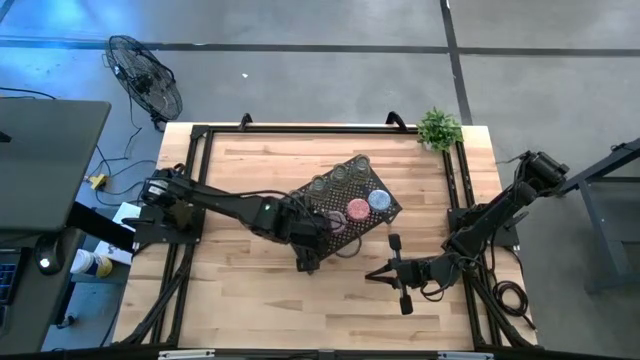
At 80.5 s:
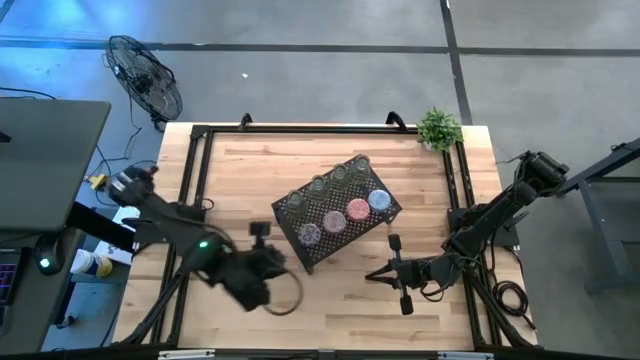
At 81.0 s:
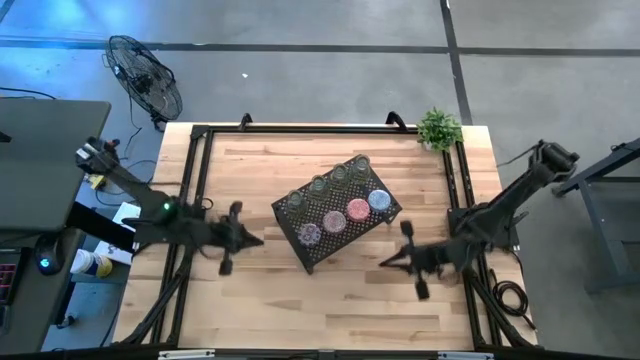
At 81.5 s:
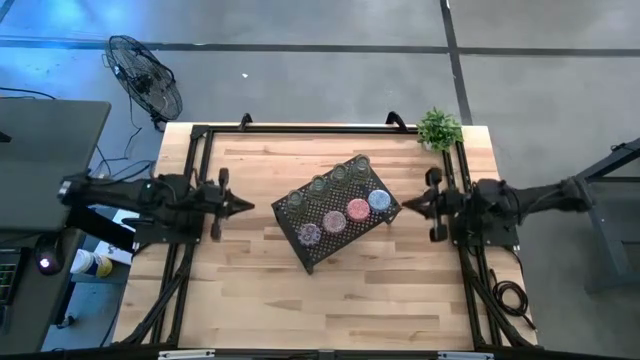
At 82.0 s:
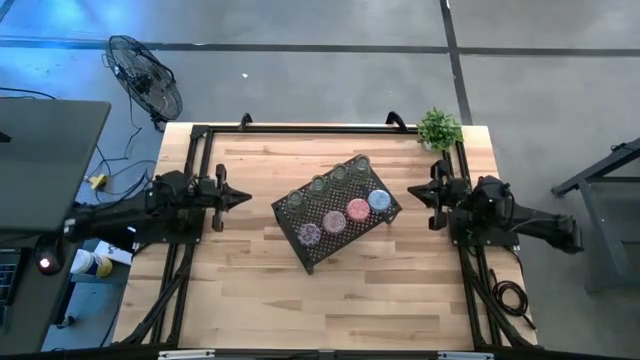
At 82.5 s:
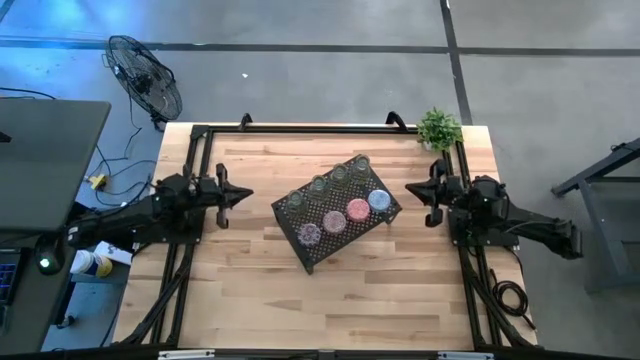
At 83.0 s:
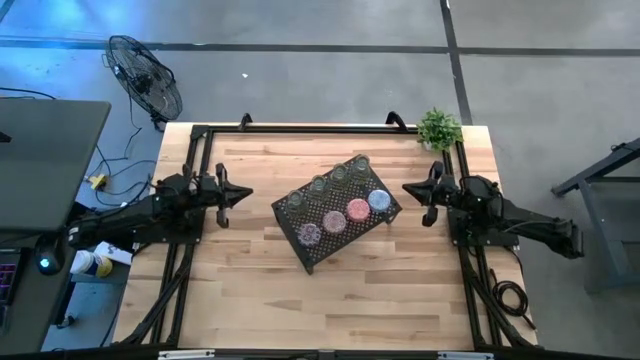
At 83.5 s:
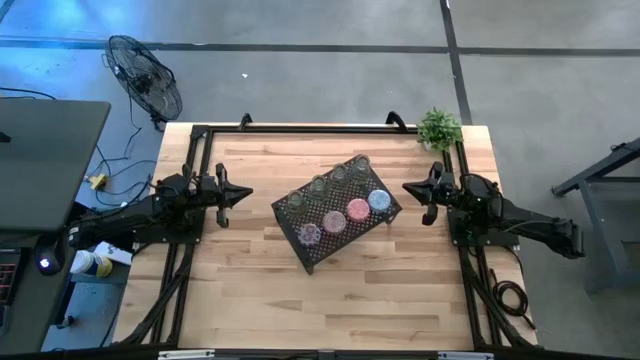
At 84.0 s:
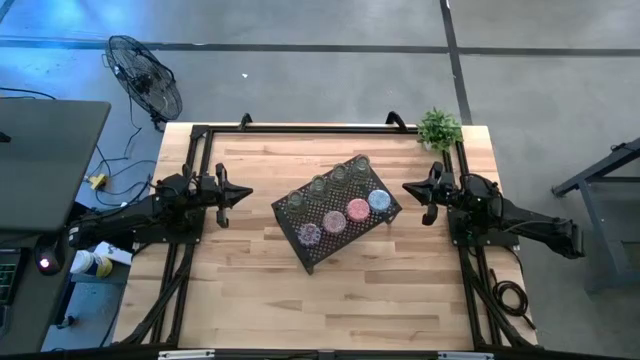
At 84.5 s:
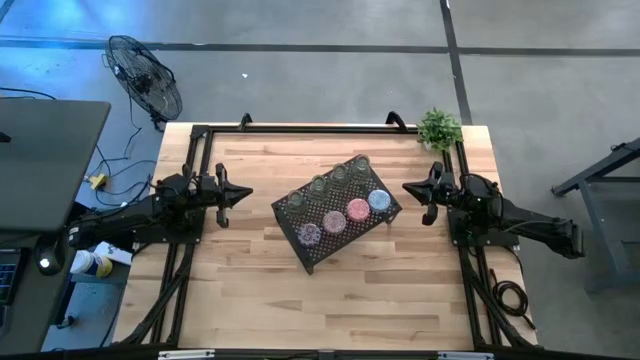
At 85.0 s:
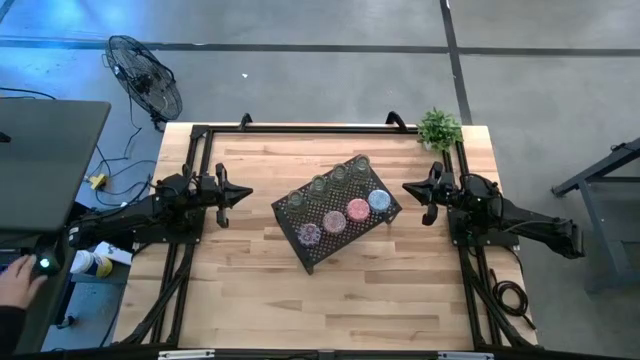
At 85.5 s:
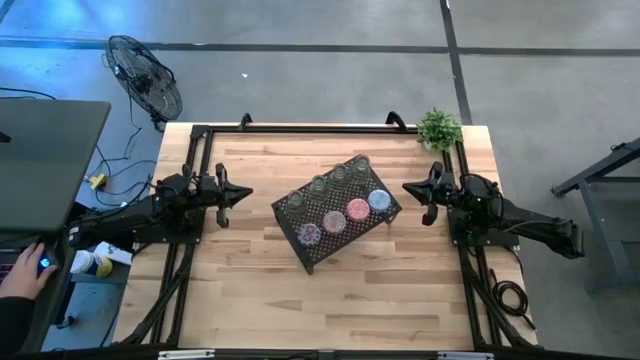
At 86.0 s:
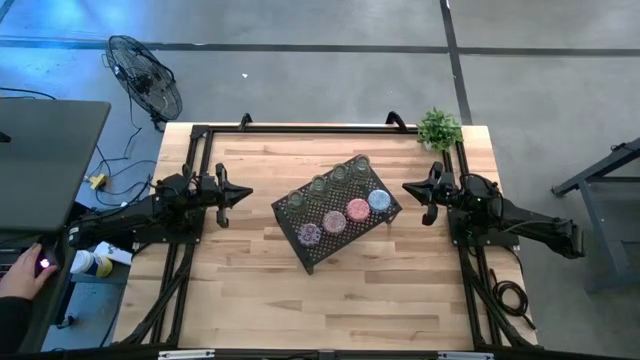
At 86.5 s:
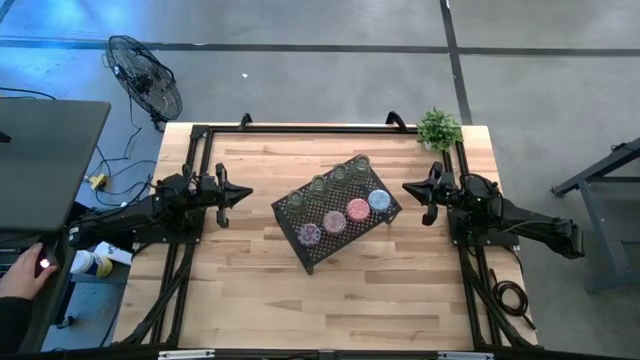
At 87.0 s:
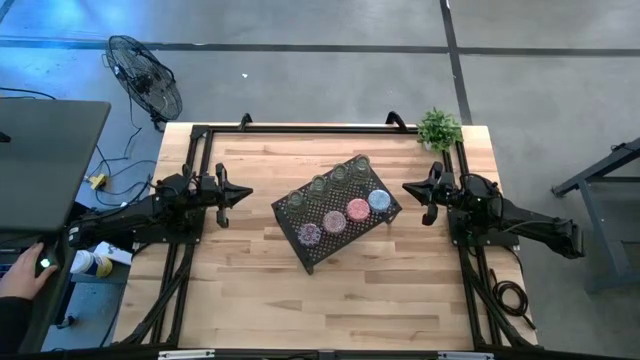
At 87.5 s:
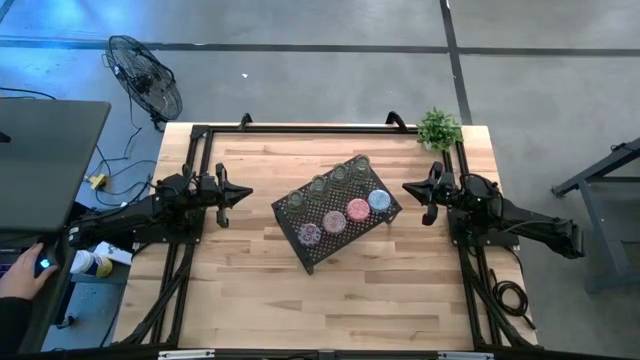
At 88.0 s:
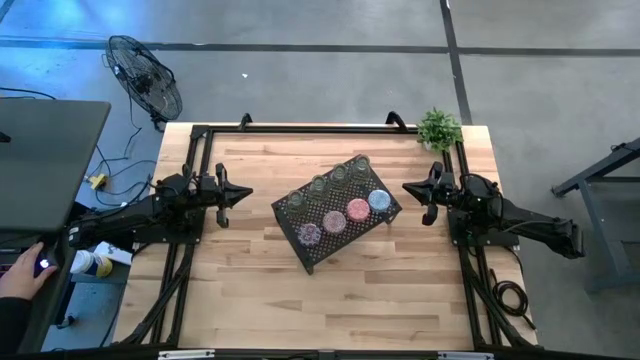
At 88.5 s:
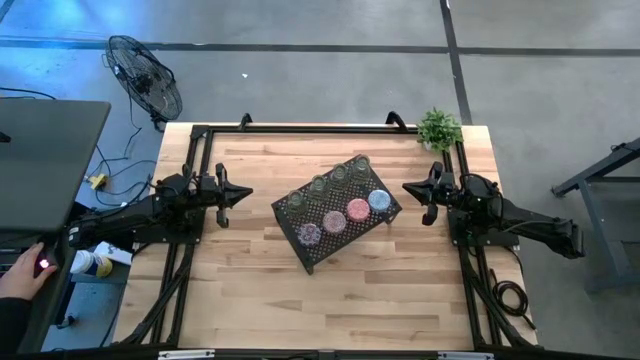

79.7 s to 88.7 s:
Task: Pick & Place candle stick holders
Return to Home Position

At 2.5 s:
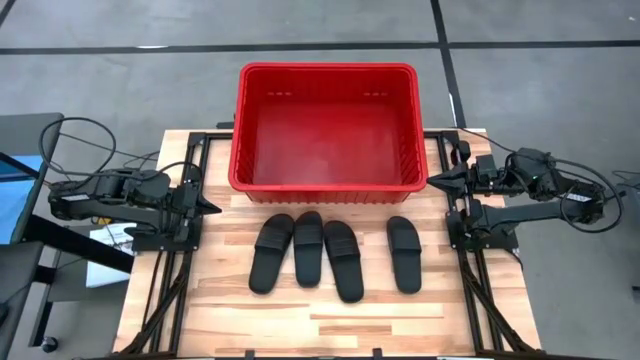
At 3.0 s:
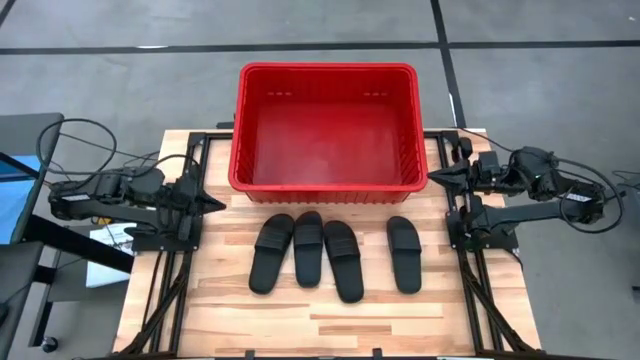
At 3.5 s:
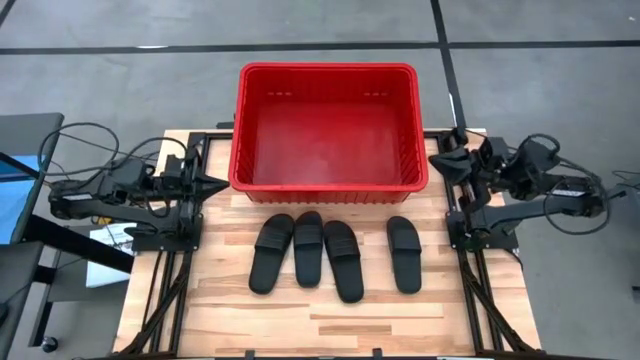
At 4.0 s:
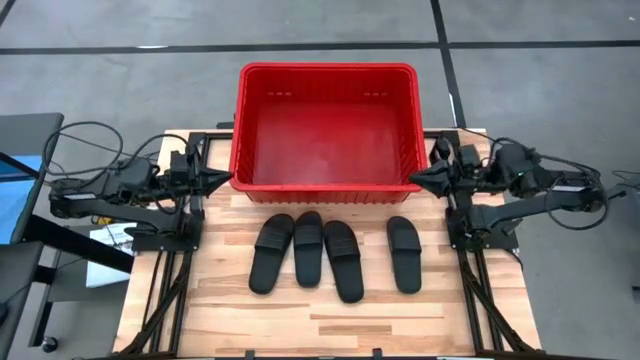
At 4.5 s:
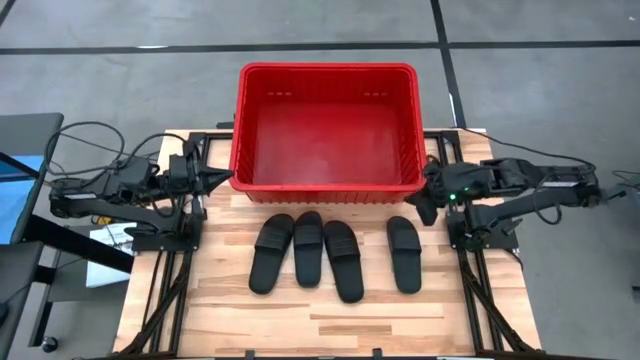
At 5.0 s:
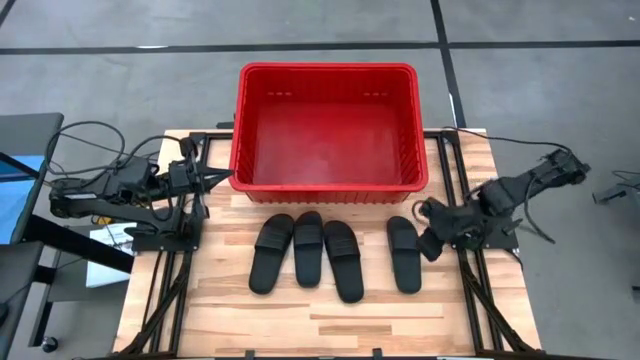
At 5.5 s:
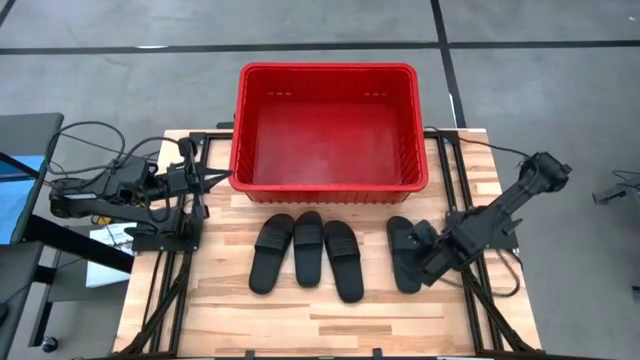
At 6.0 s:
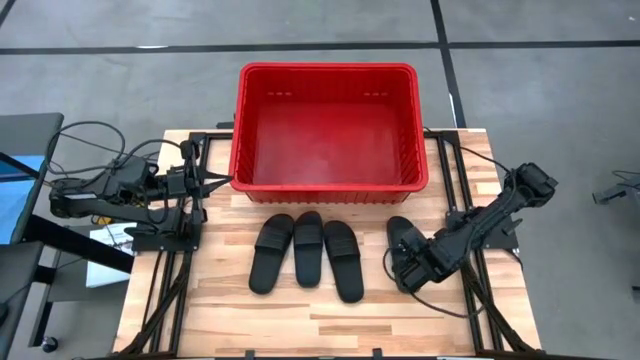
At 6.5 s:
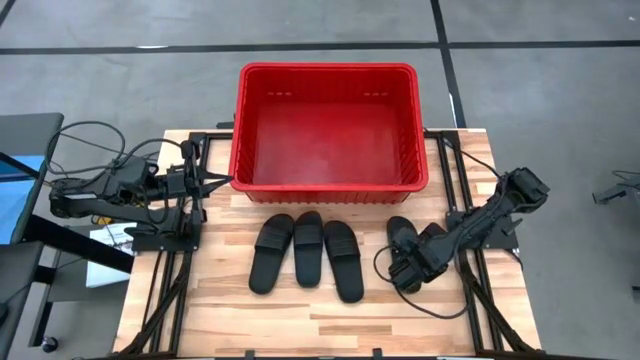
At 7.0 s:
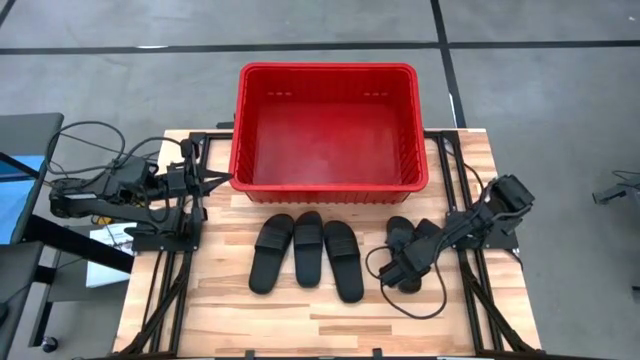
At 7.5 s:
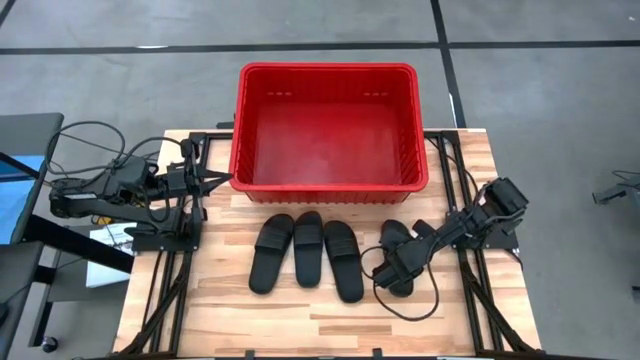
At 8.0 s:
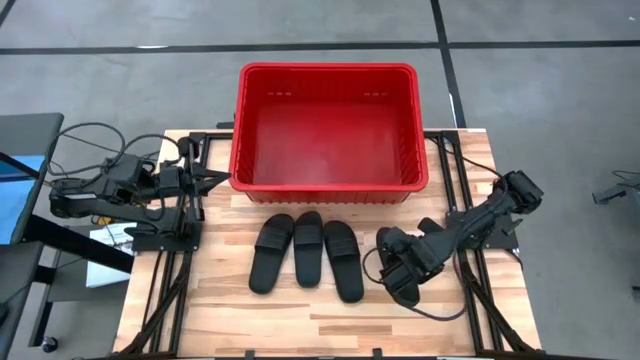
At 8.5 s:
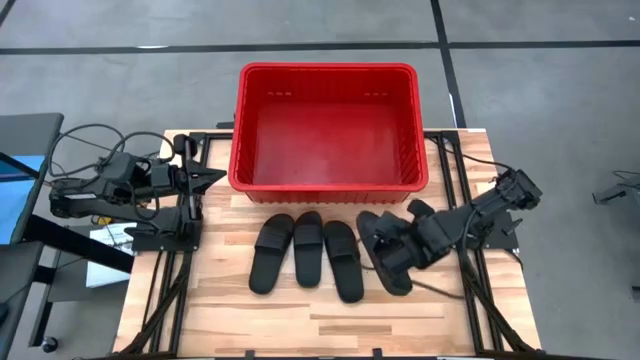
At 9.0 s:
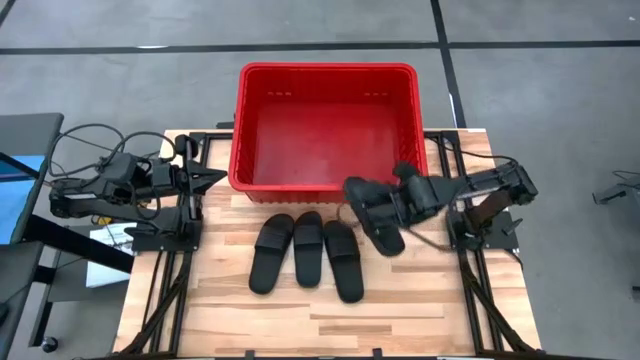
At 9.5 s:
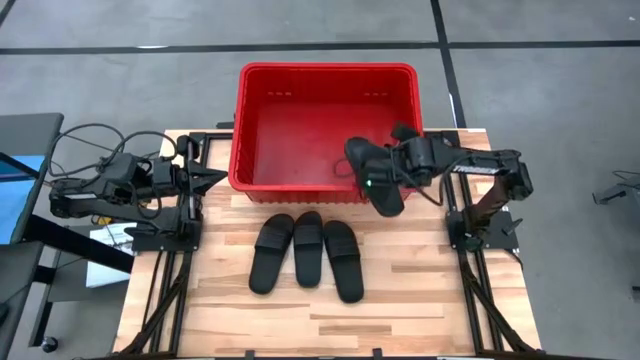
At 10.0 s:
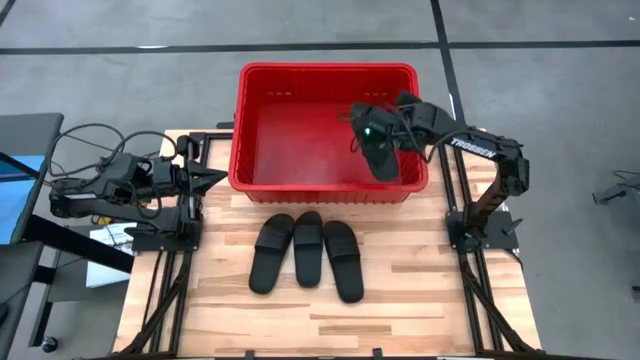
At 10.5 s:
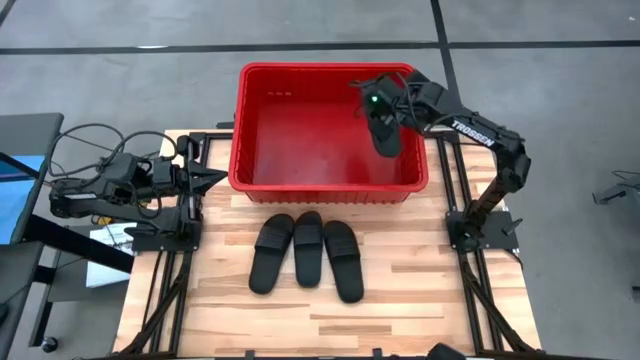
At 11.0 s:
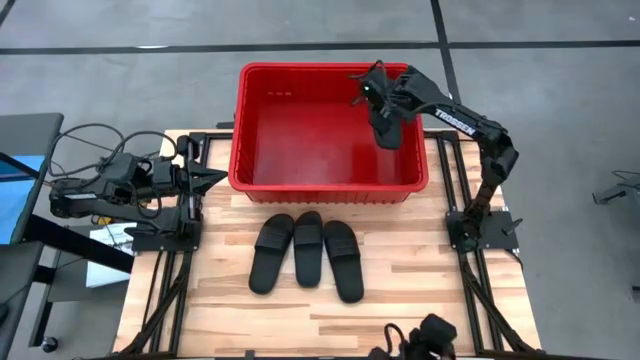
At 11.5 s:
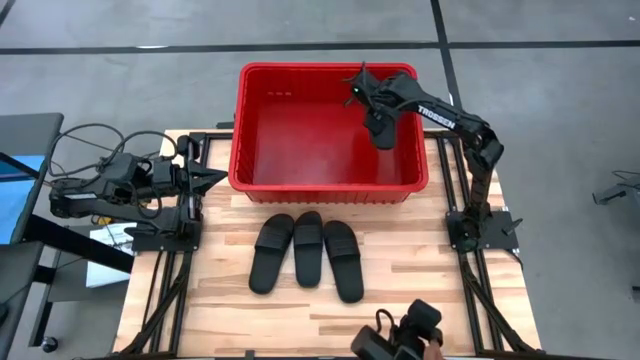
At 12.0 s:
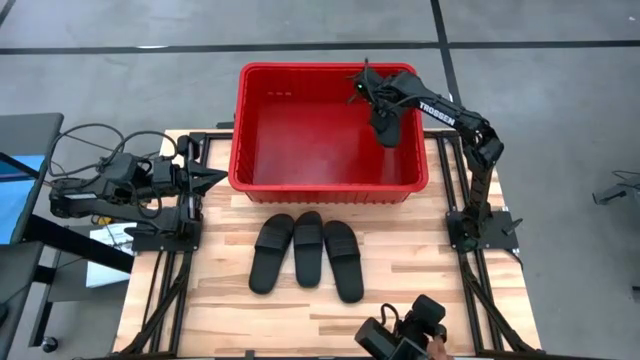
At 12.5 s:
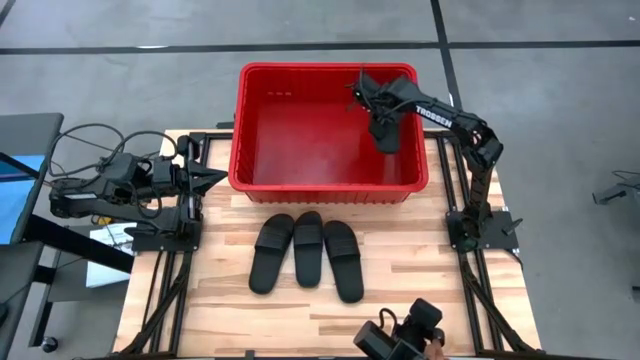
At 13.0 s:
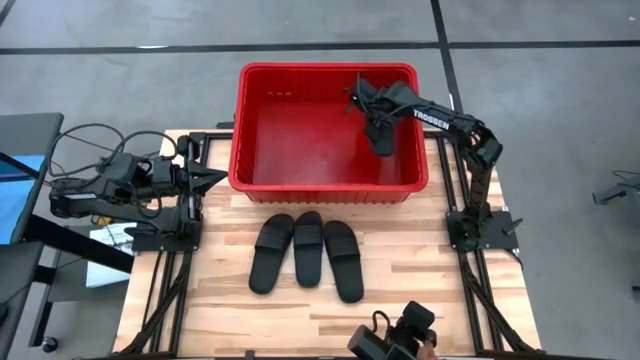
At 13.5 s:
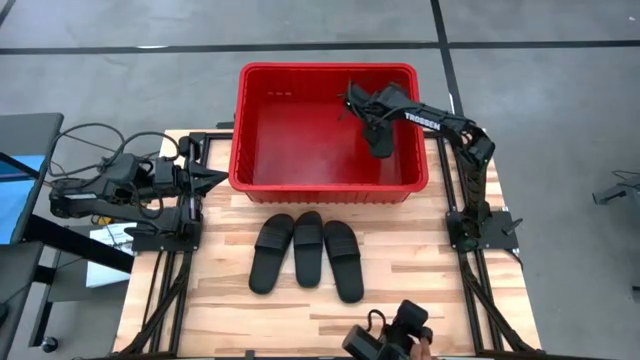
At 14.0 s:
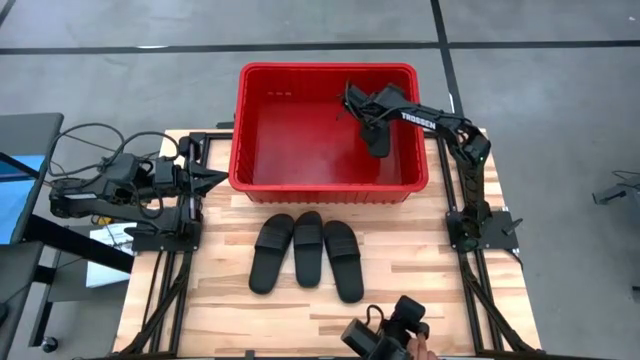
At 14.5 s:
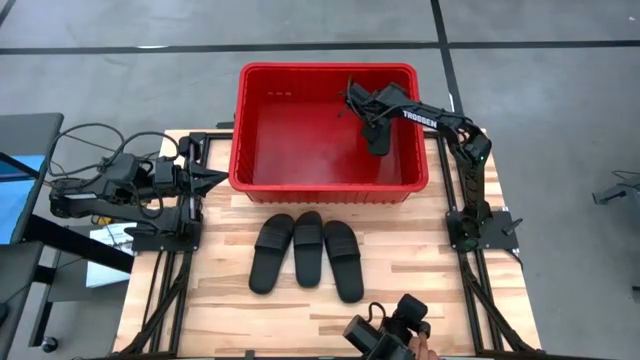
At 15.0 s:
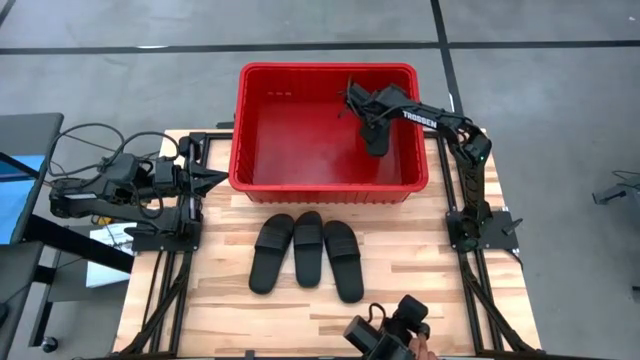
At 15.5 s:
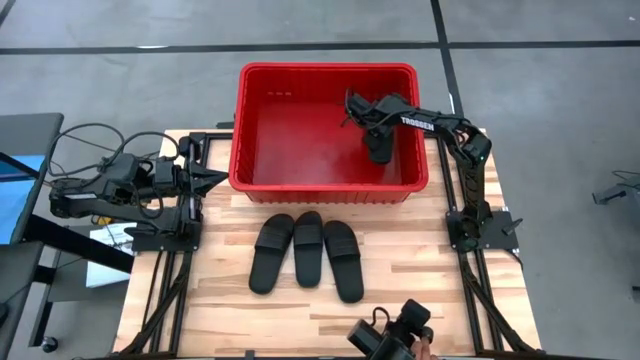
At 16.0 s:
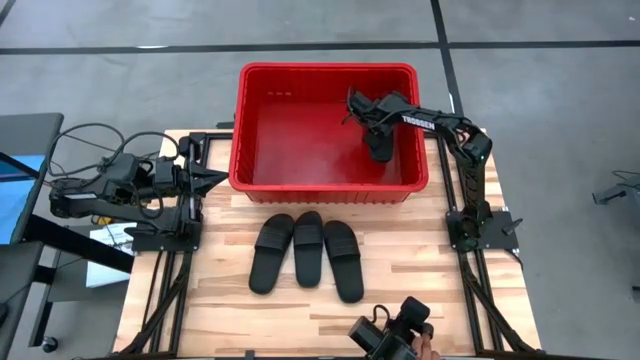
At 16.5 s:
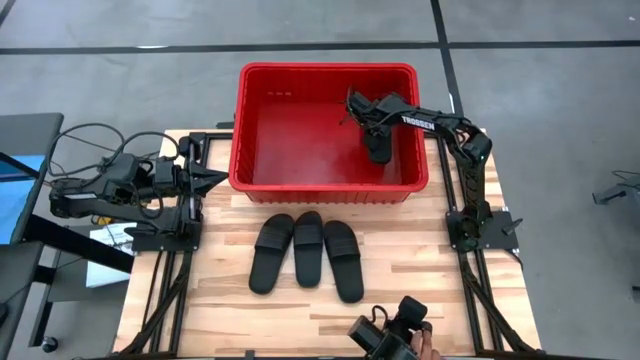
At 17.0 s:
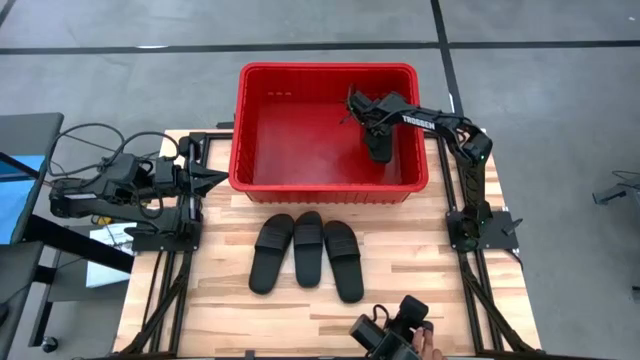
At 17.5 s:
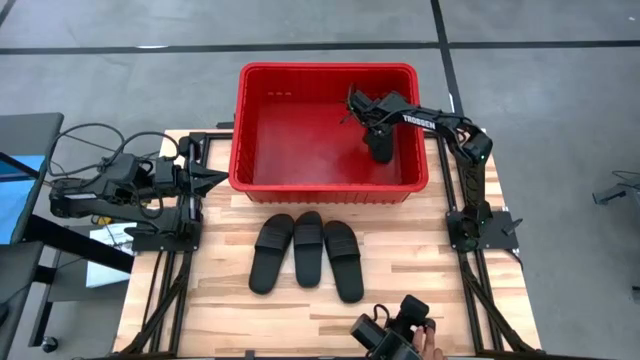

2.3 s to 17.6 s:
Task: Pick and place slides into bin
Put the black slide into the red container
